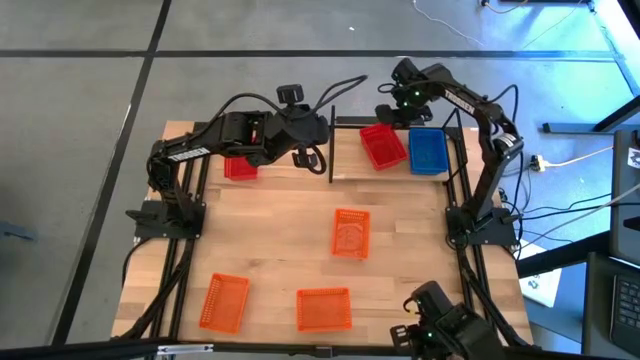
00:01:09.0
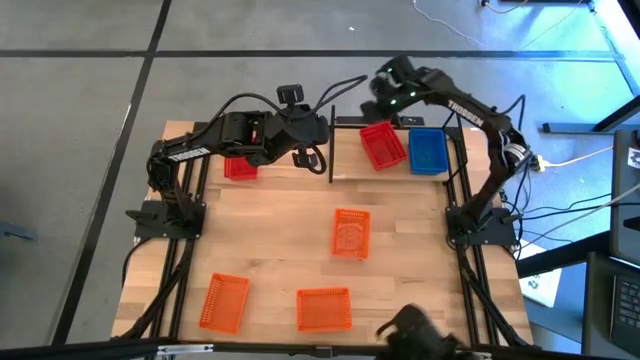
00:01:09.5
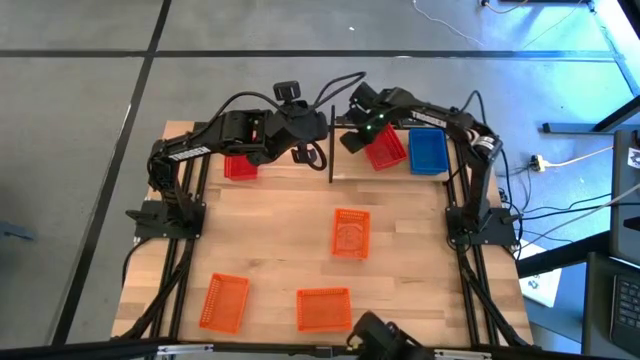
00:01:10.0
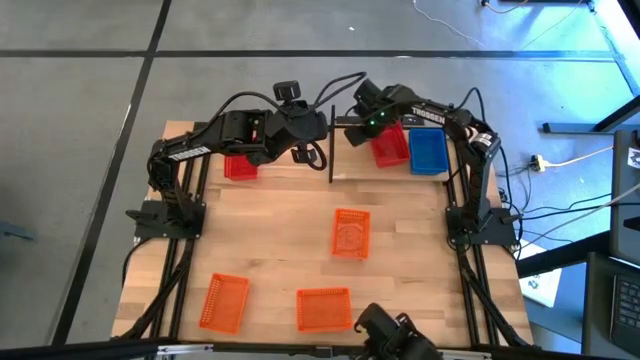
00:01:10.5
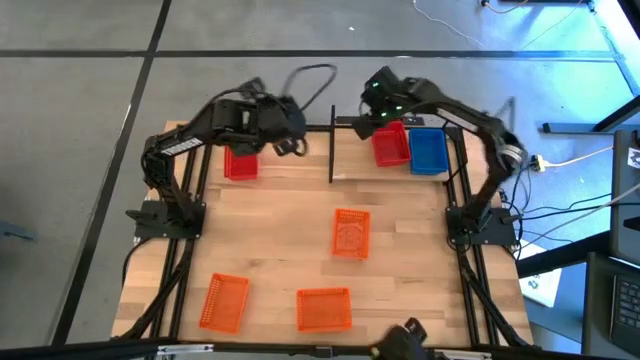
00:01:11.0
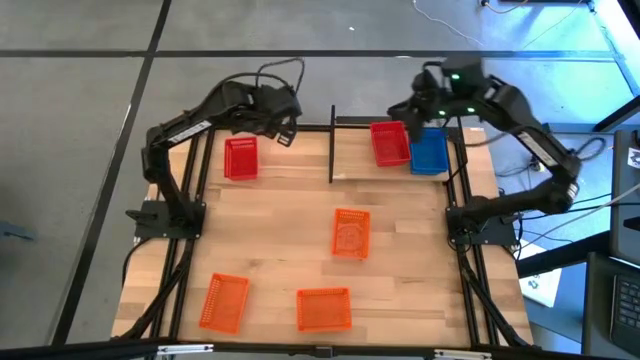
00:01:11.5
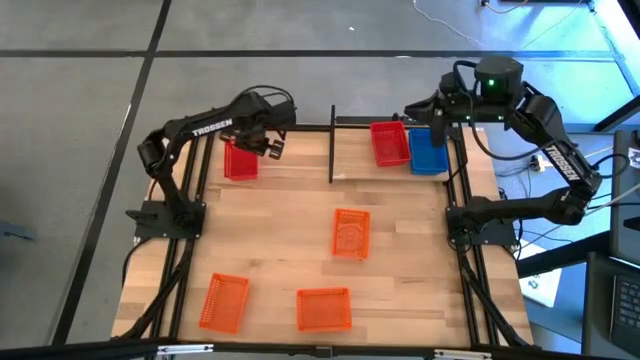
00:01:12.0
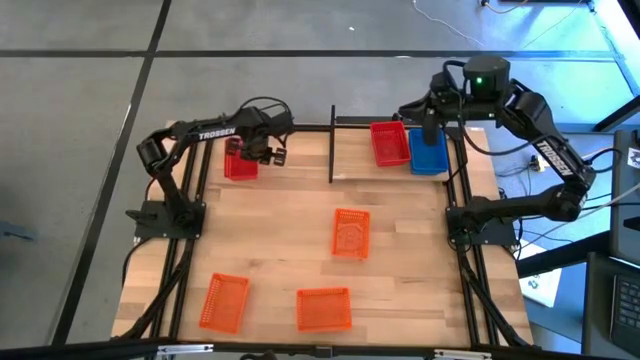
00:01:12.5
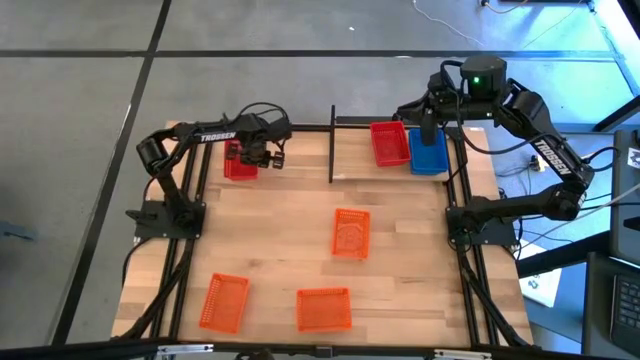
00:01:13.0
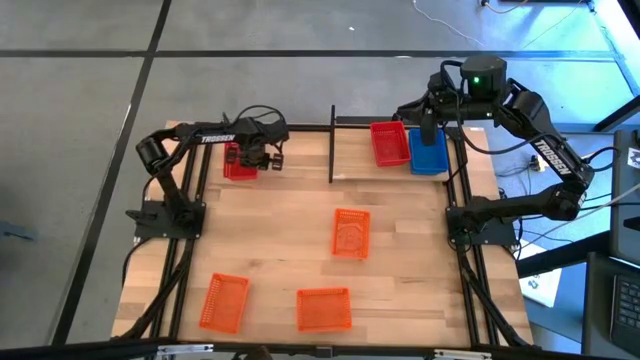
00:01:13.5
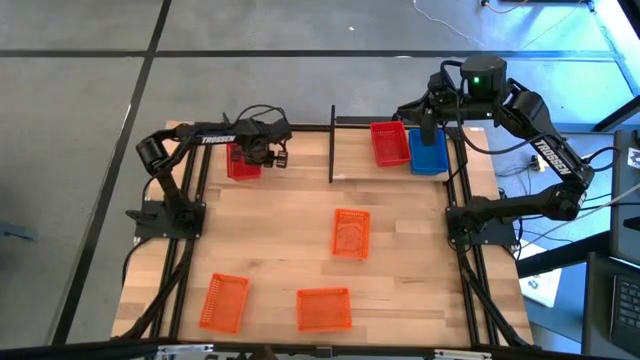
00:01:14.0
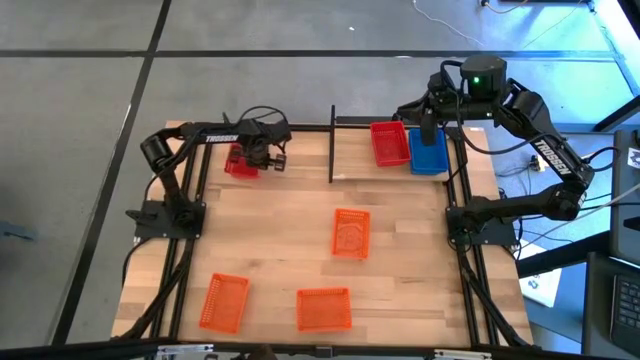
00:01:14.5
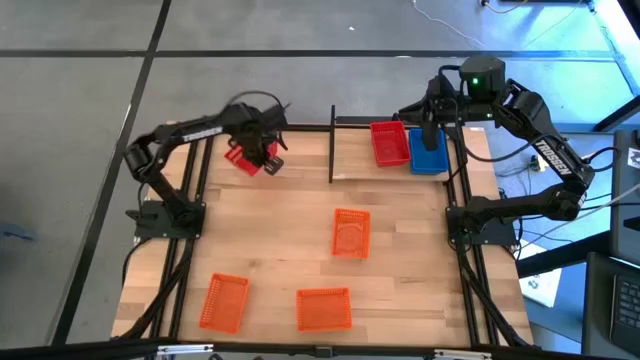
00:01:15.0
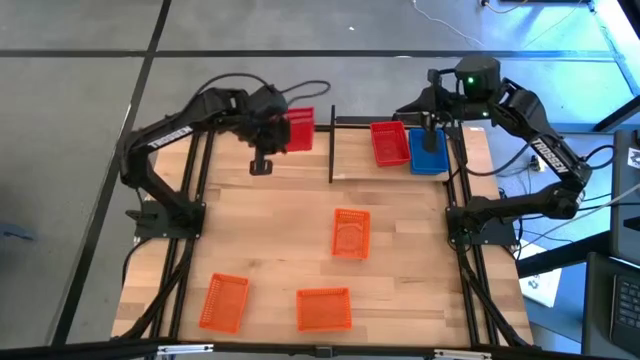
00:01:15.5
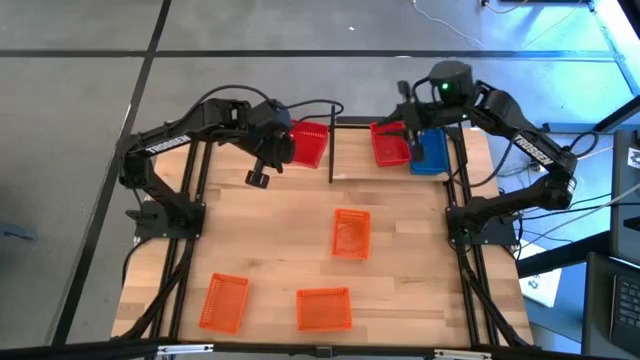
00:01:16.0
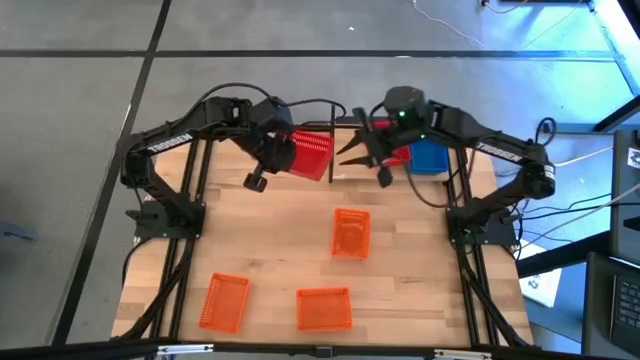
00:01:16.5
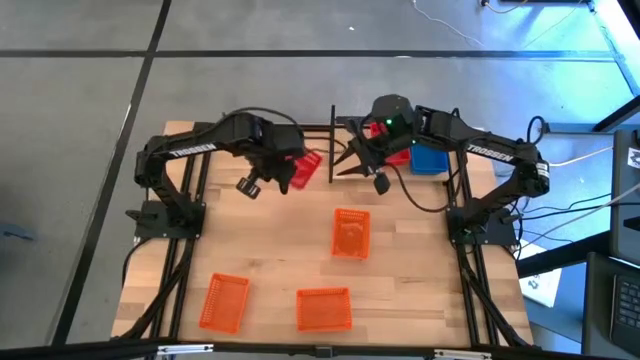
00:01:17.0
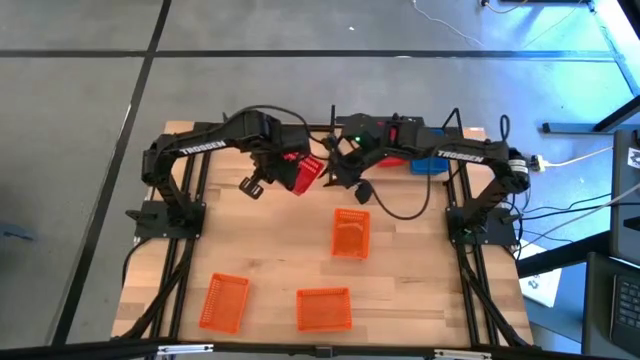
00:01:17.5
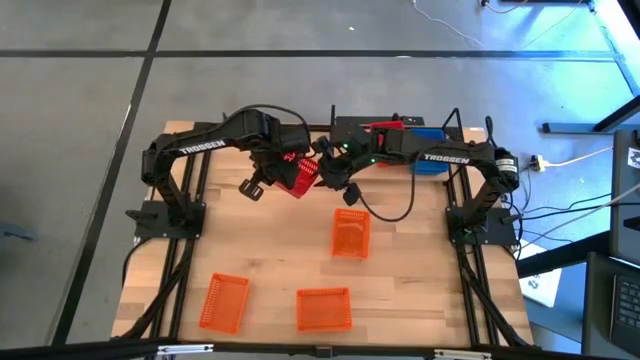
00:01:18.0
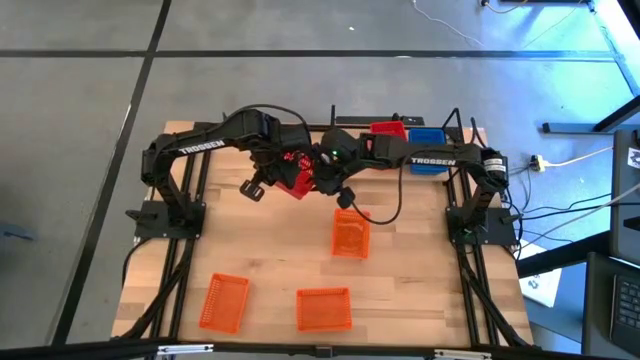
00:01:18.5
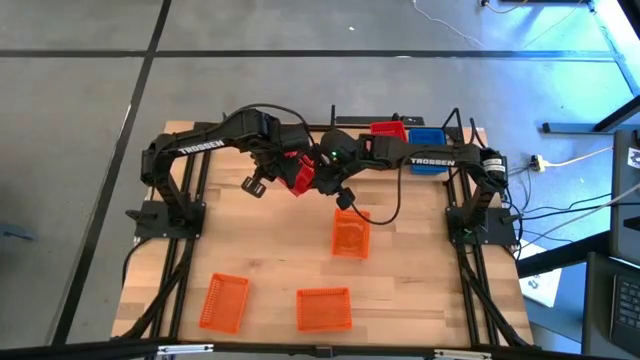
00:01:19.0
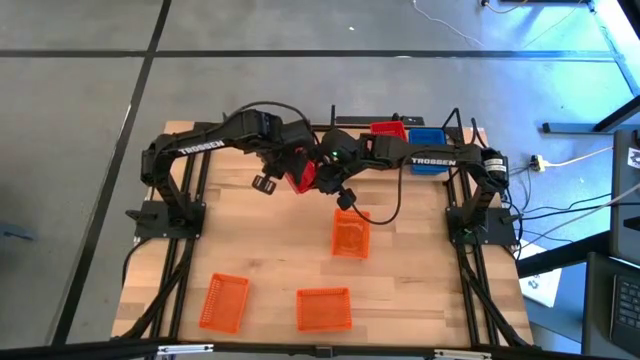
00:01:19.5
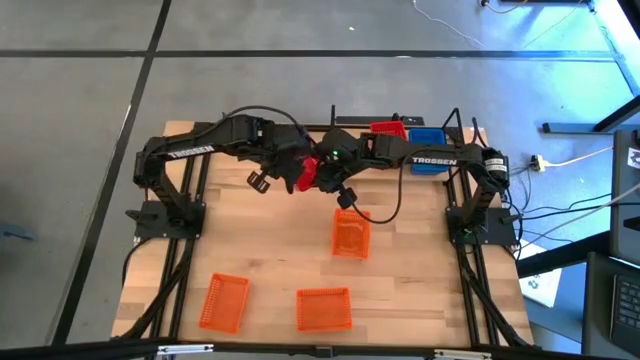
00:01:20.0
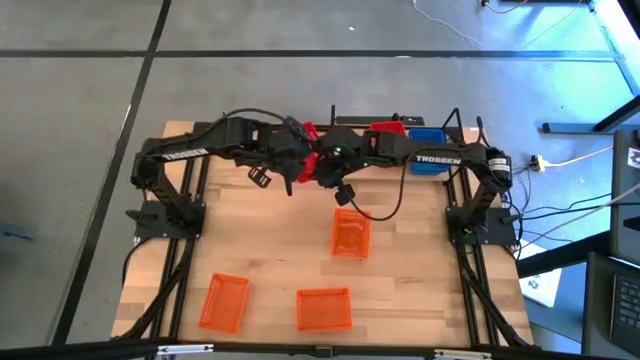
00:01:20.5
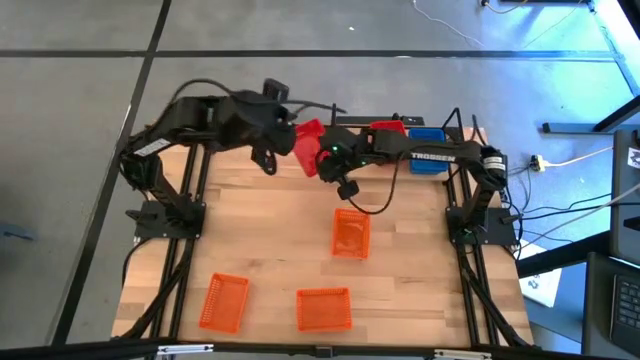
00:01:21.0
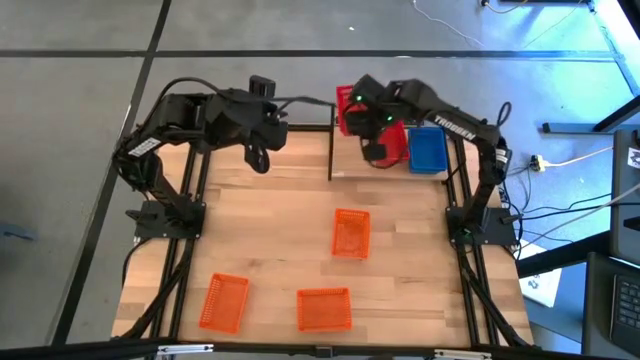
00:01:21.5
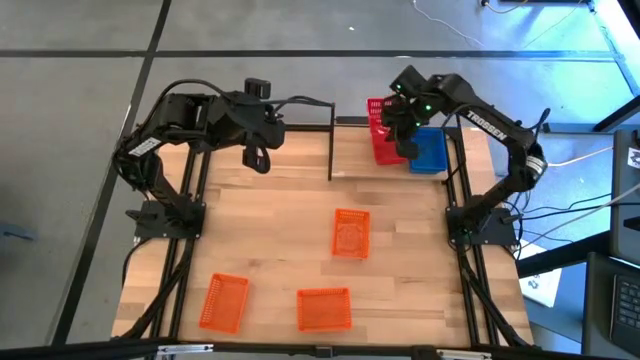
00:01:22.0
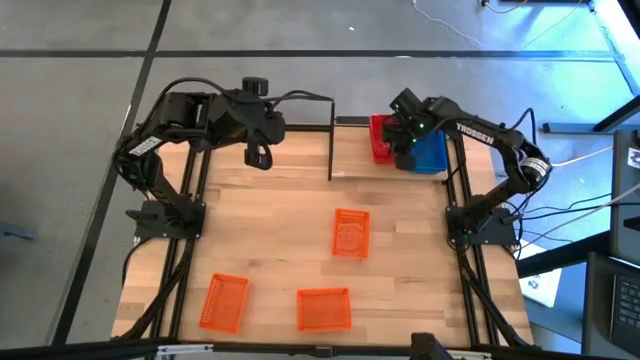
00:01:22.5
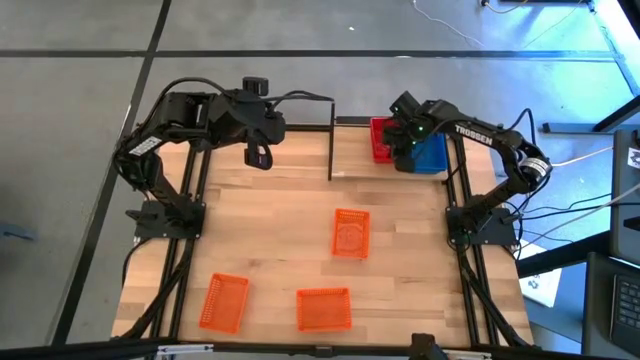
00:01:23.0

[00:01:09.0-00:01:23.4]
Task: Stack baskets on shelf by color
Stack the red basket on top of the stacked red basket on the shelf

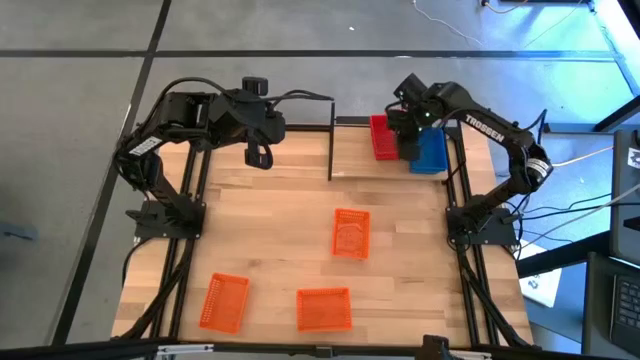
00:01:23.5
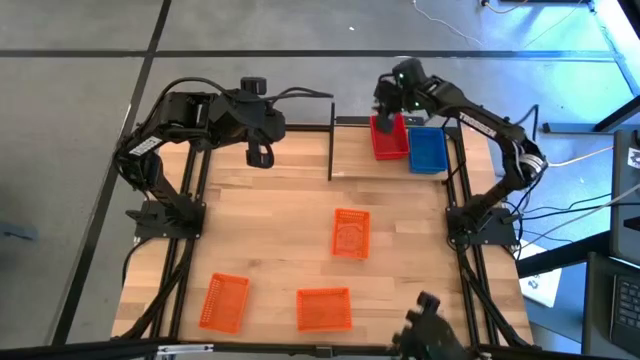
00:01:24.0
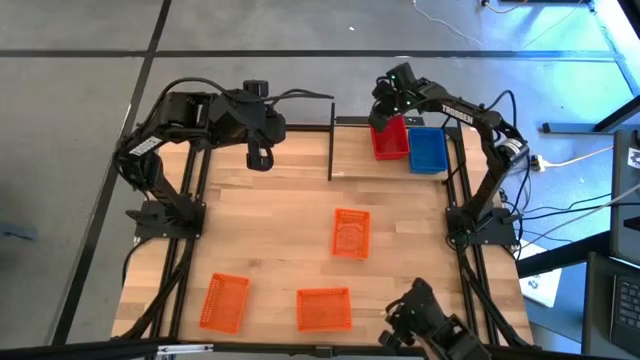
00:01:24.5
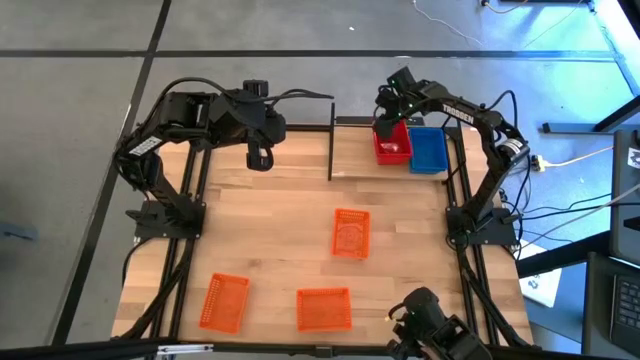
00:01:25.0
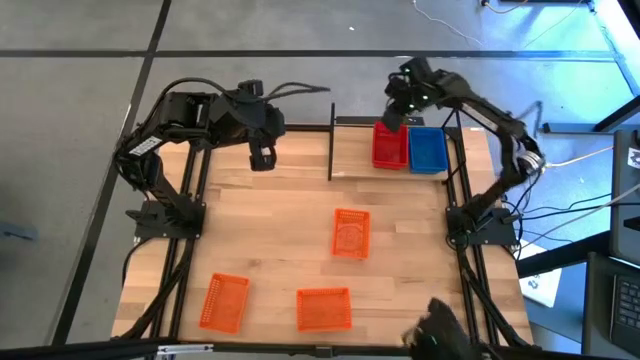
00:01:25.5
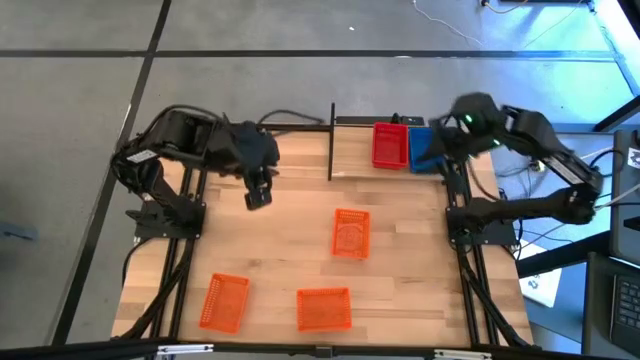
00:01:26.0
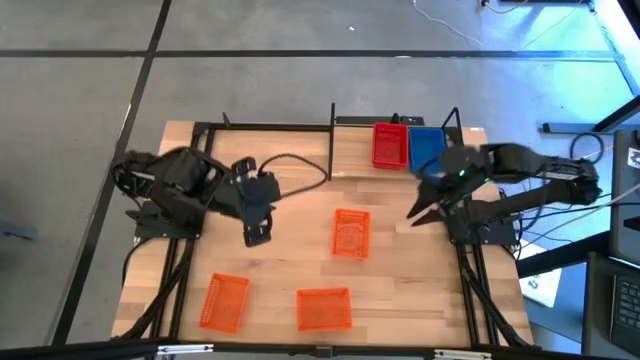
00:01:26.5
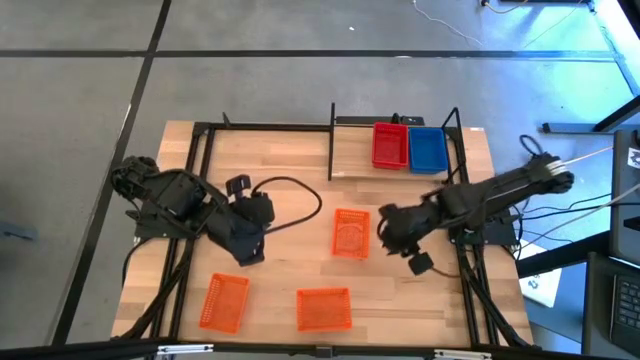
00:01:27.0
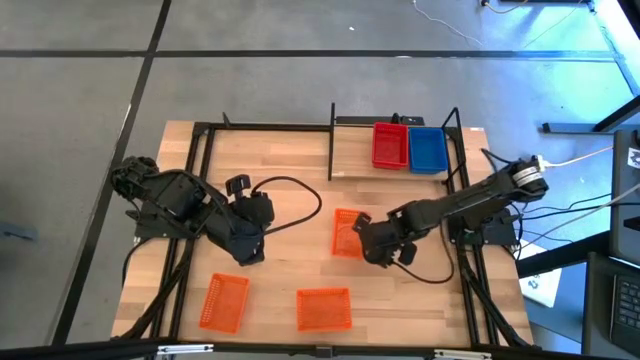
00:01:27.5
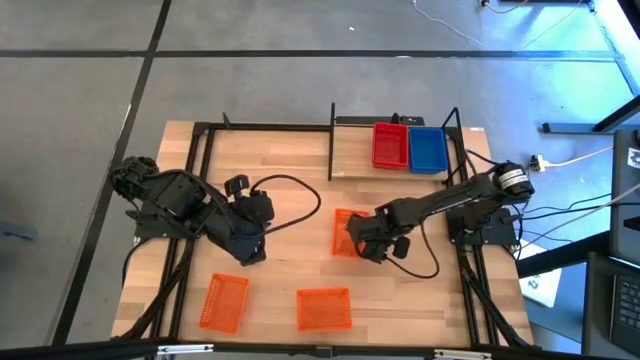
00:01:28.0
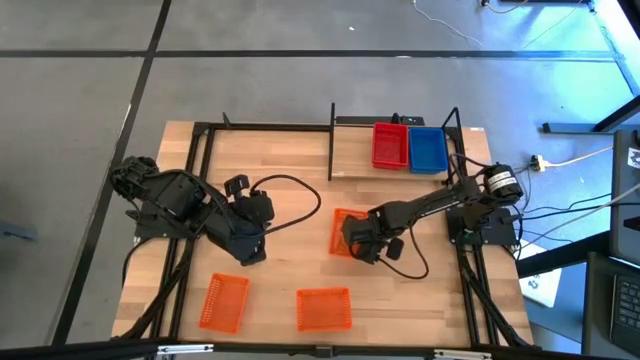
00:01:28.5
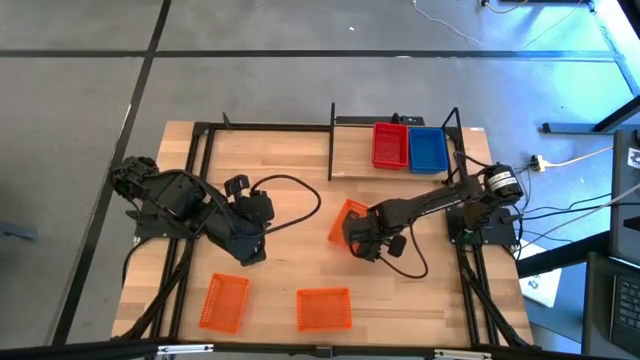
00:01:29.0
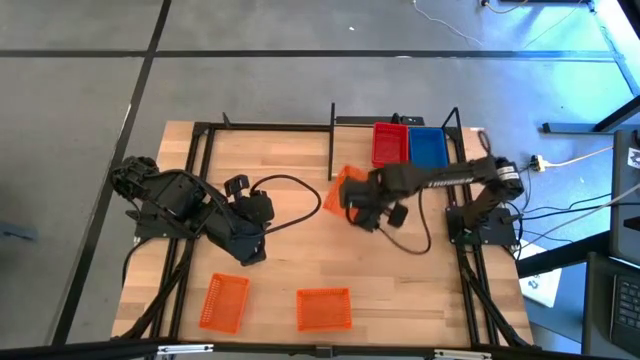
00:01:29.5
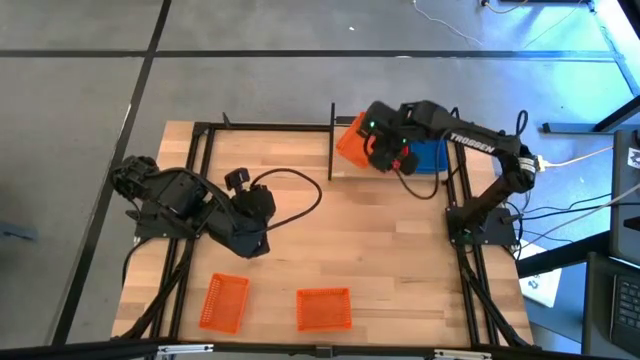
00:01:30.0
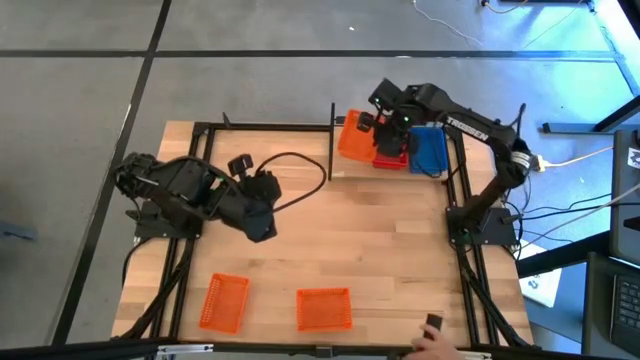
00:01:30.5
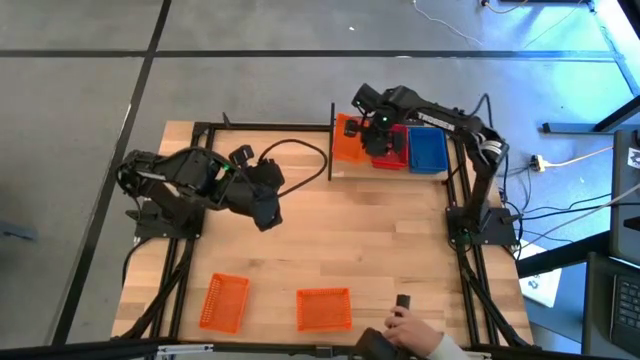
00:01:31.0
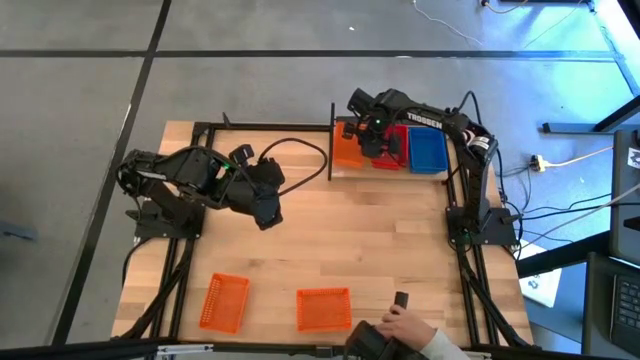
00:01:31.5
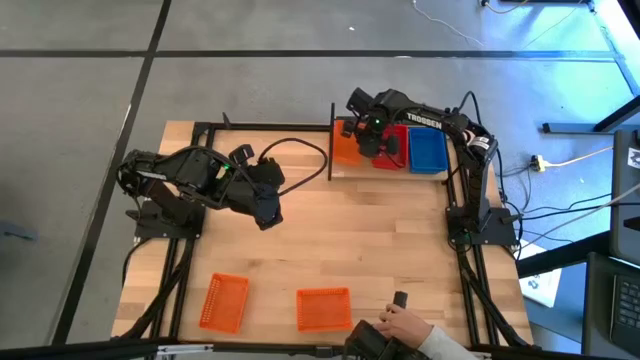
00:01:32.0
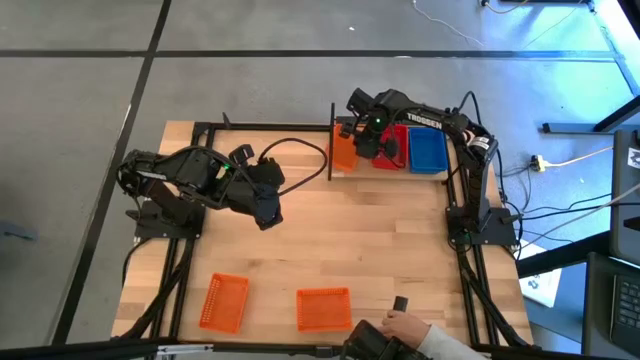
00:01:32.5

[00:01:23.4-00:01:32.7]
Put the top orange basket on the shelf
